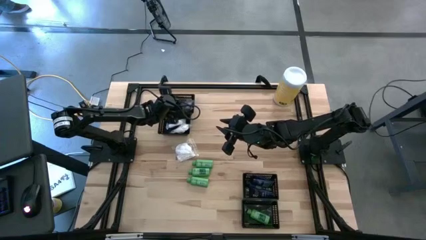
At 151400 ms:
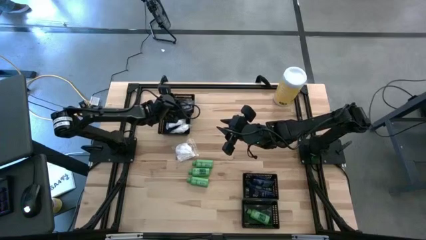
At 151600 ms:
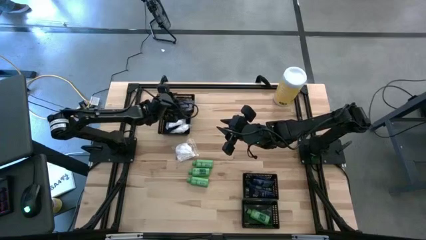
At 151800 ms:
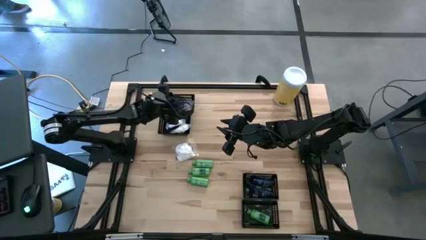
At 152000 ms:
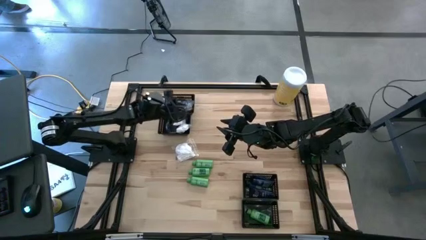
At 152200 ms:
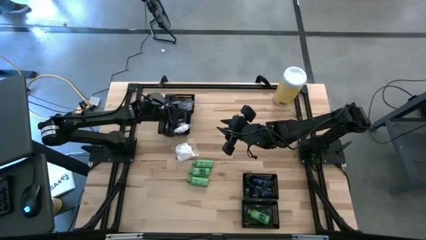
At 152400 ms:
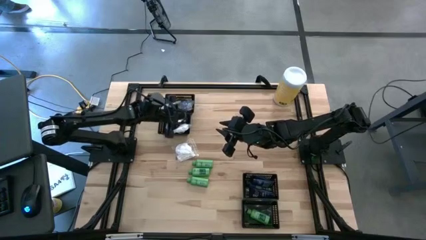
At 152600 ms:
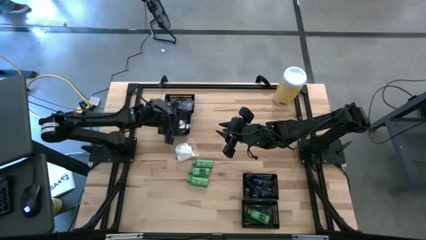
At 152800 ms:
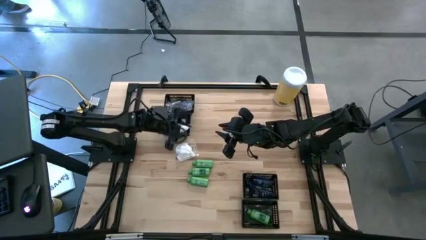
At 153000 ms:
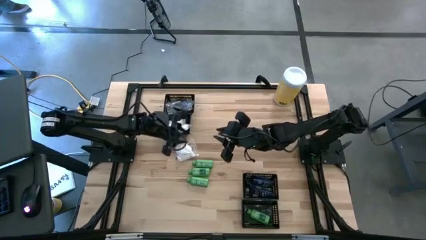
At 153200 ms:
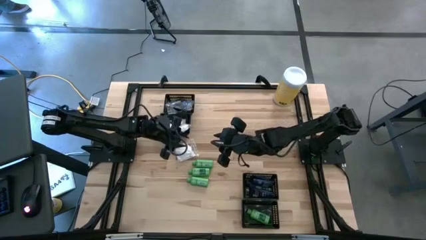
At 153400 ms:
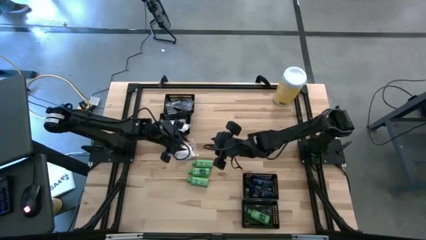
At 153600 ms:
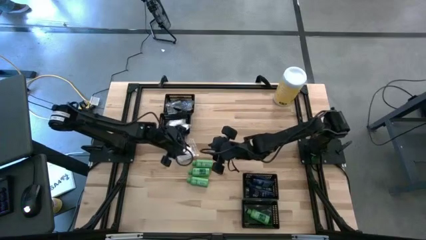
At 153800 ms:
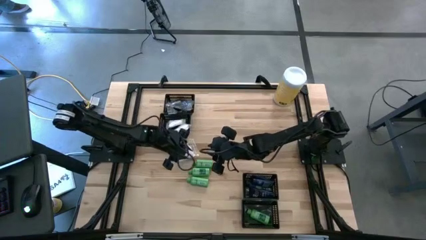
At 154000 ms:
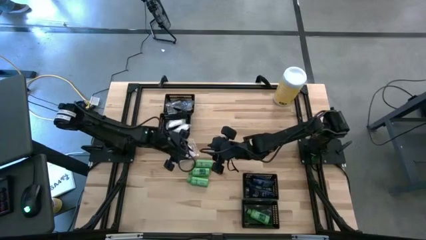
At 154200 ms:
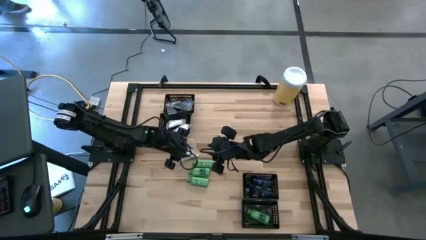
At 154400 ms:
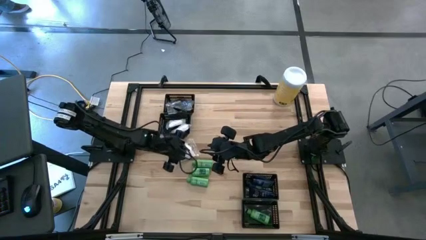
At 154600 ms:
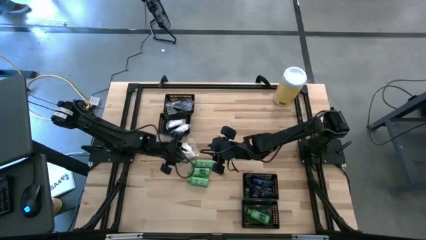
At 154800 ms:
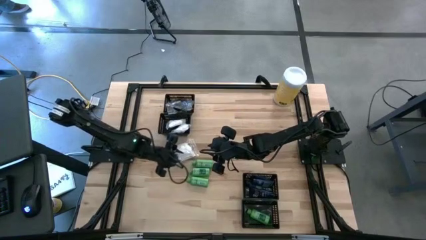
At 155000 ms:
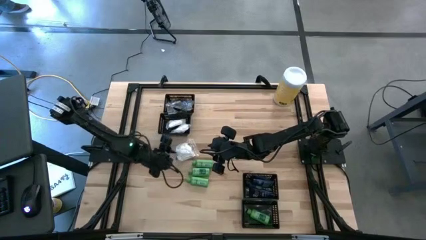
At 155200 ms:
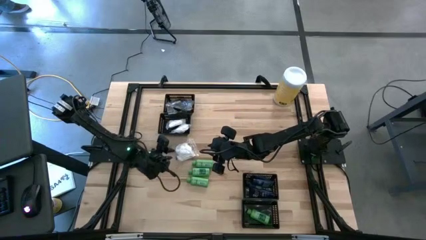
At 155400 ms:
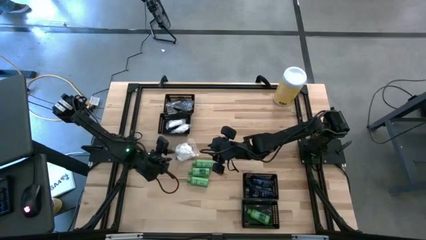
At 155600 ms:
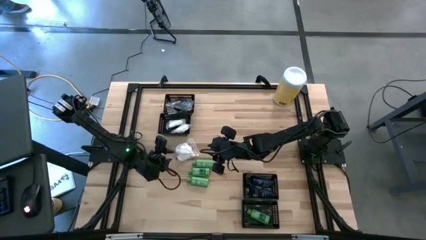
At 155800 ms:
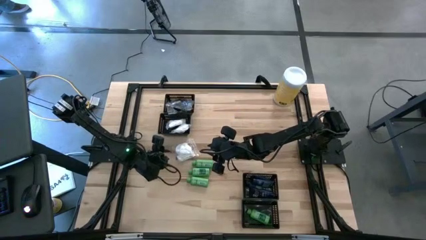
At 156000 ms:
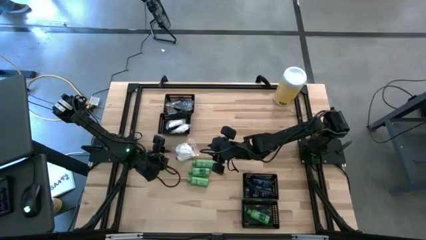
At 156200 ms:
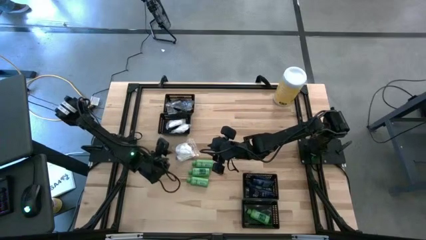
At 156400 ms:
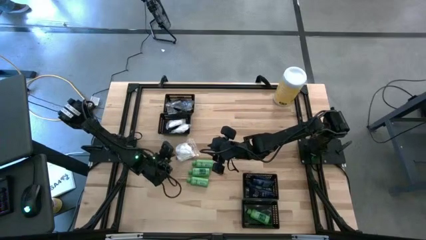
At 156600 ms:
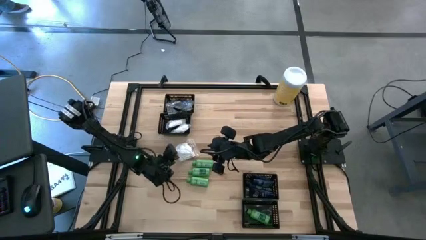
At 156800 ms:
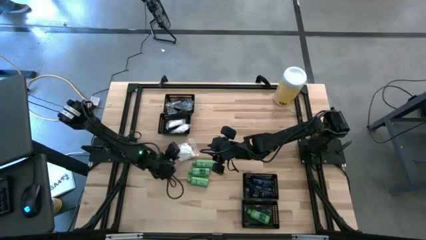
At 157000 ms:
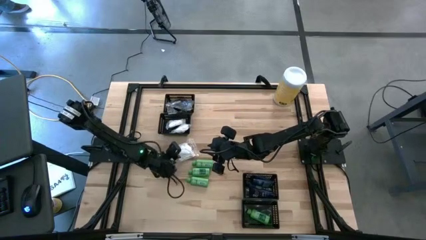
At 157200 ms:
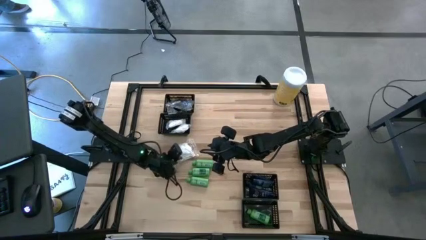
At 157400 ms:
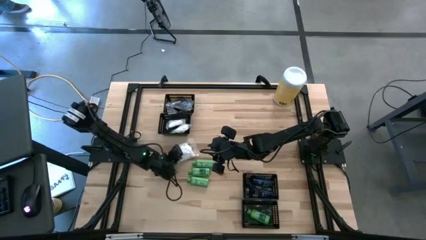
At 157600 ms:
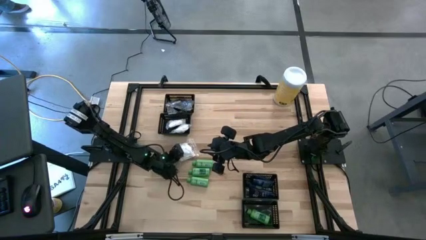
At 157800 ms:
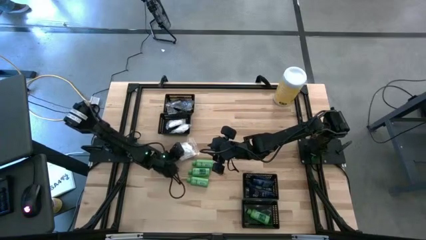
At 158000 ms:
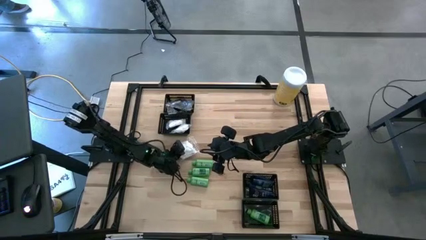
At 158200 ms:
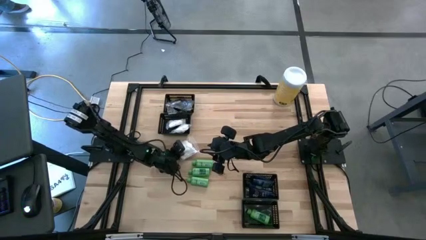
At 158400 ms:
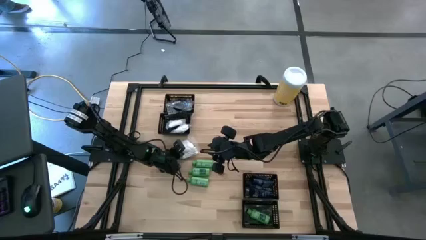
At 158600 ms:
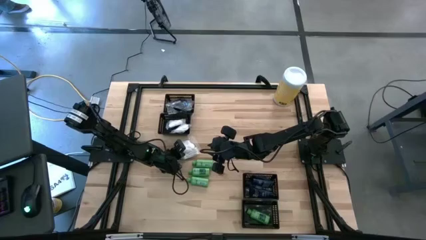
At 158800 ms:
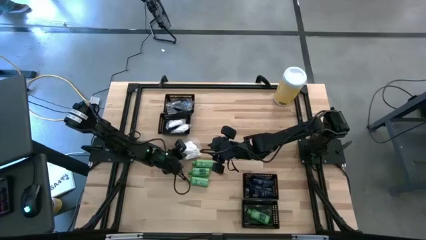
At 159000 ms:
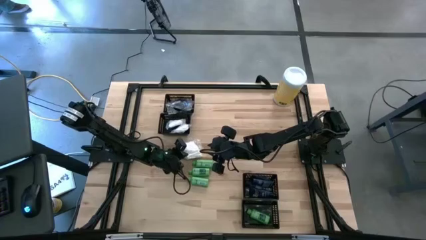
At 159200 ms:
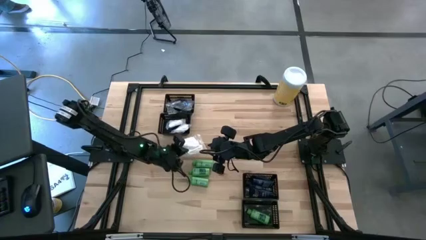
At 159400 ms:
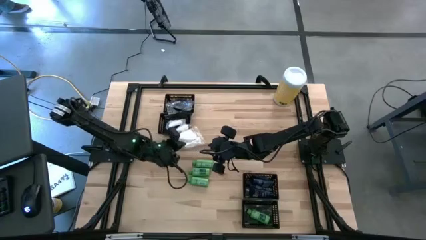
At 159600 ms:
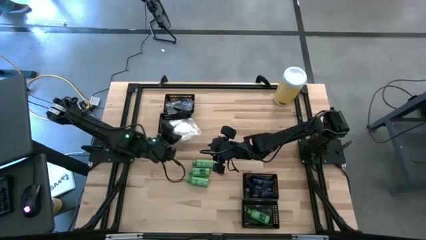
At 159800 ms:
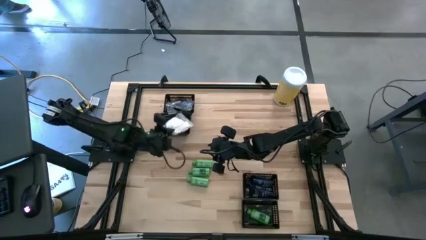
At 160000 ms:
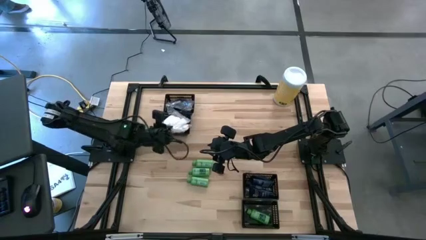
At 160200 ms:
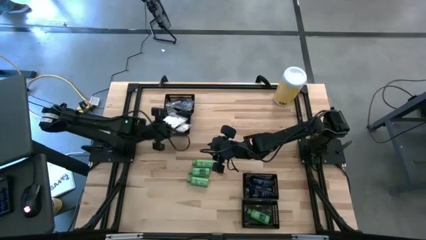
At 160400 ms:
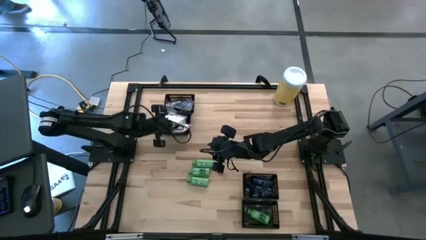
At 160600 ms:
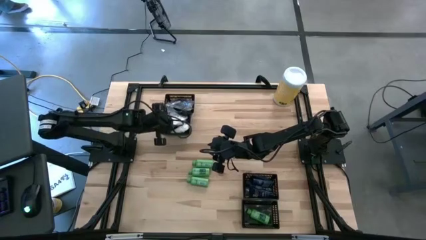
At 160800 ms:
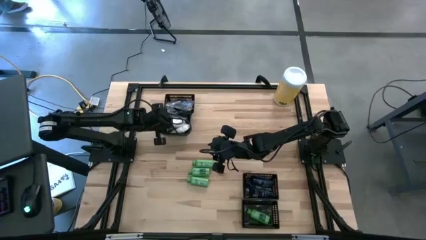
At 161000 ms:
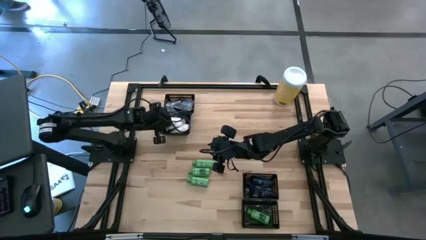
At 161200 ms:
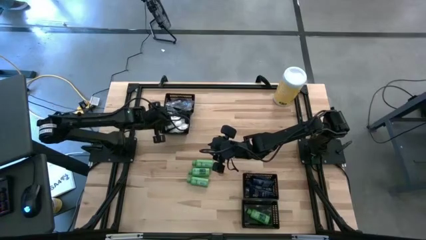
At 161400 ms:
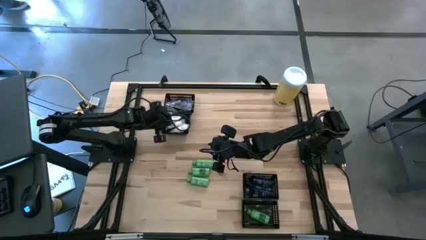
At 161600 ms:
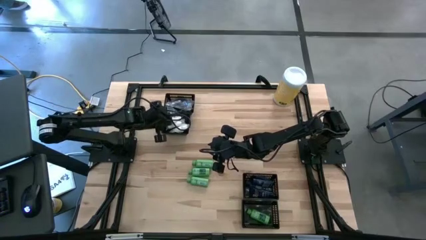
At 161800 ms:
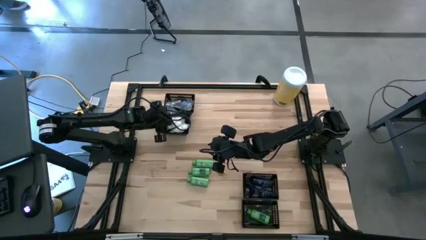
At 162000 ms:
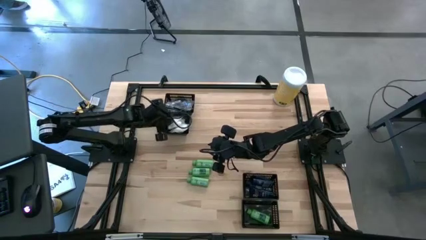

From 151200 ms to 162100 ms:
Task: Pick & Place Travel size toiletries
Put the white cotton pack into the middle top black basket
